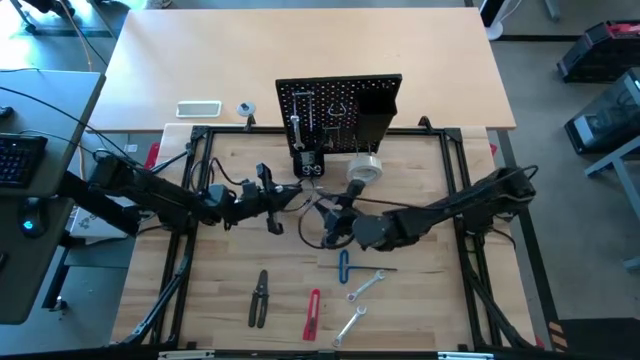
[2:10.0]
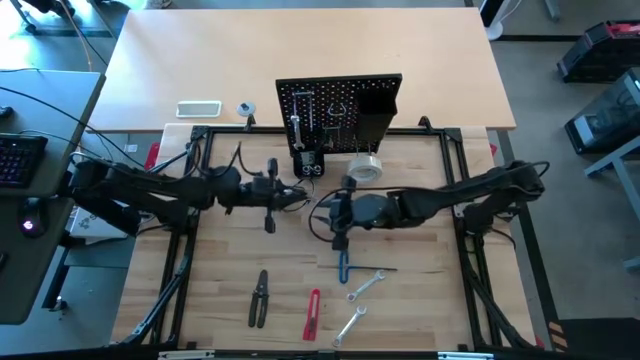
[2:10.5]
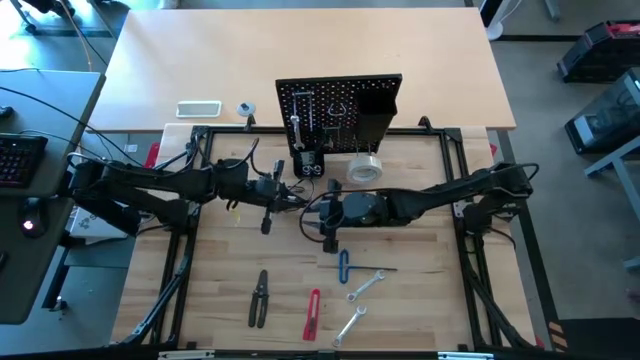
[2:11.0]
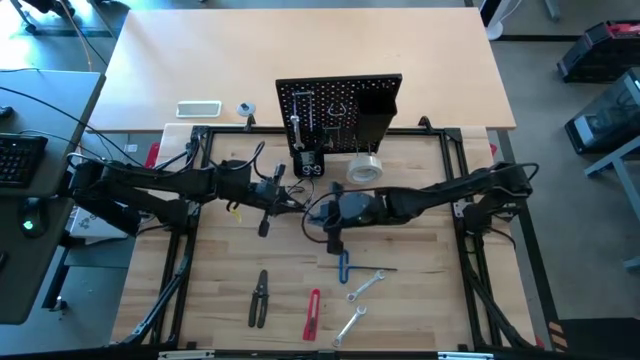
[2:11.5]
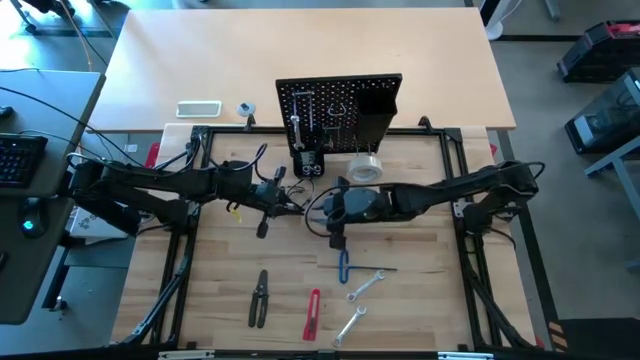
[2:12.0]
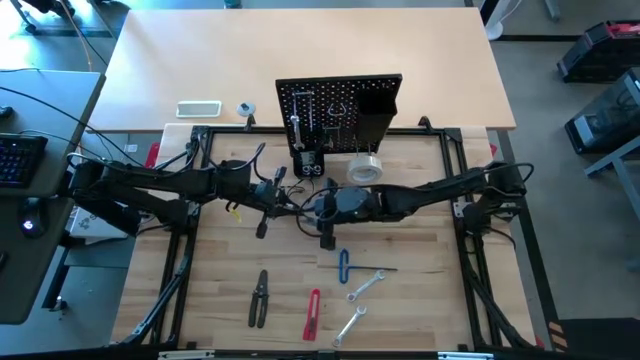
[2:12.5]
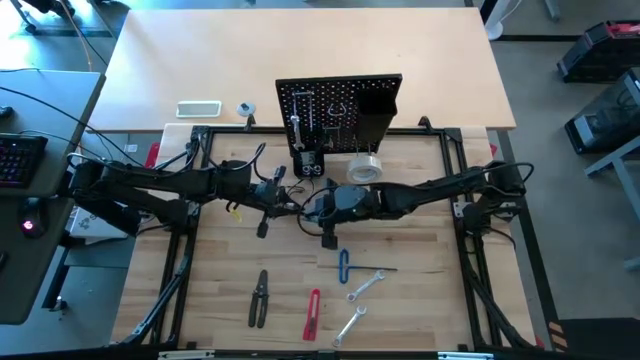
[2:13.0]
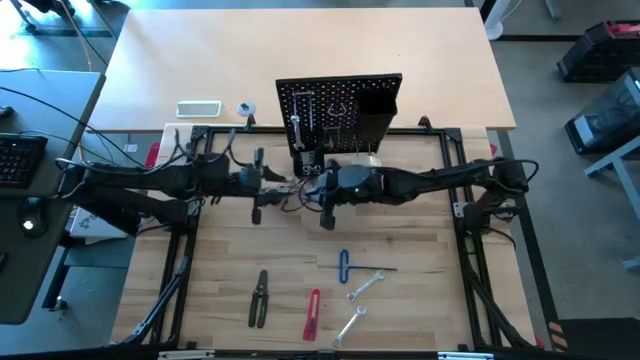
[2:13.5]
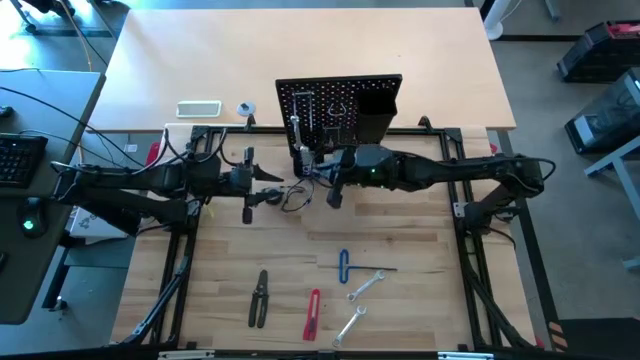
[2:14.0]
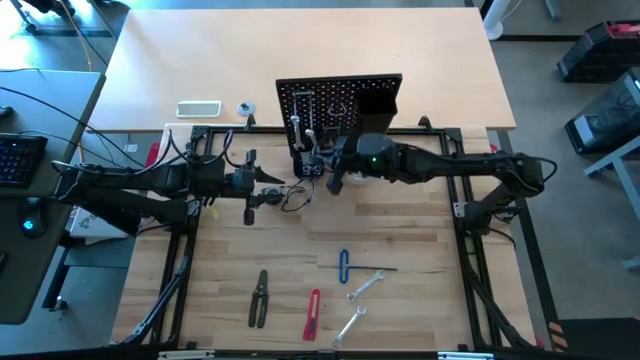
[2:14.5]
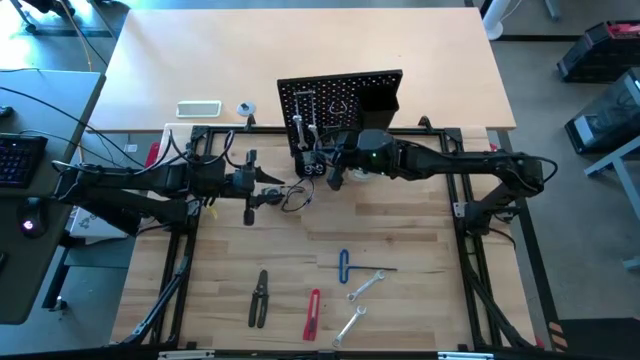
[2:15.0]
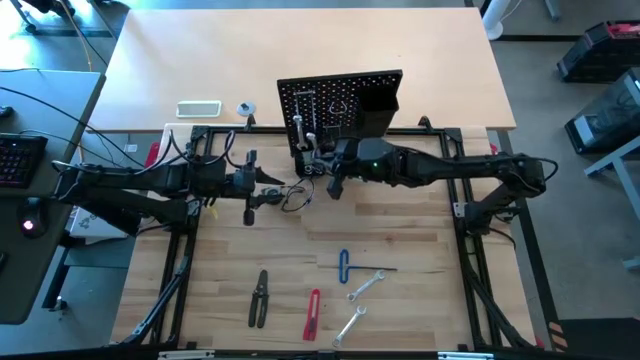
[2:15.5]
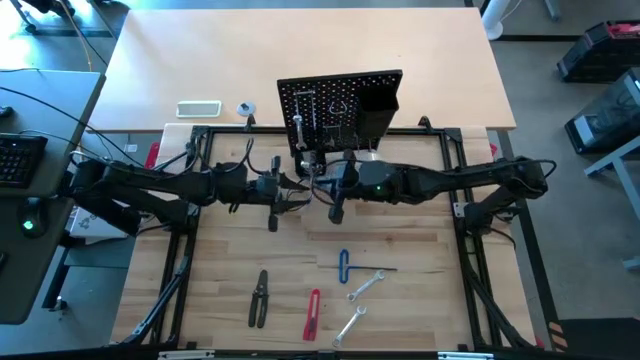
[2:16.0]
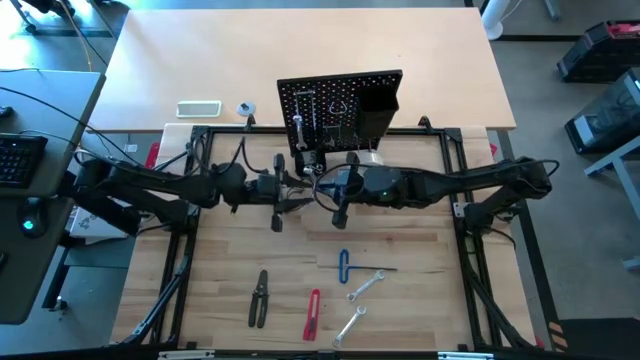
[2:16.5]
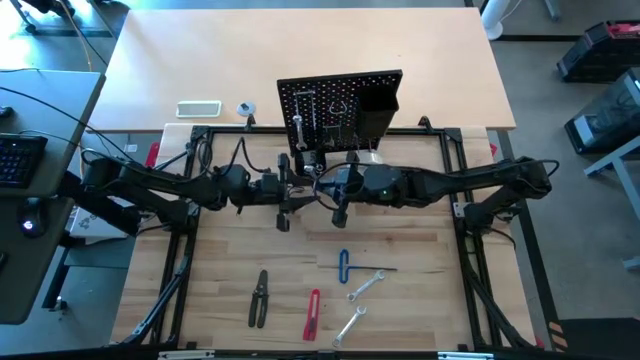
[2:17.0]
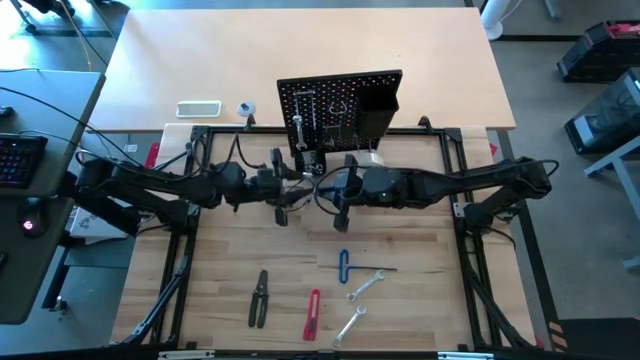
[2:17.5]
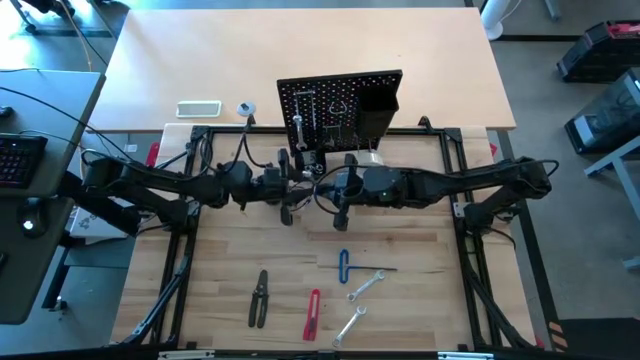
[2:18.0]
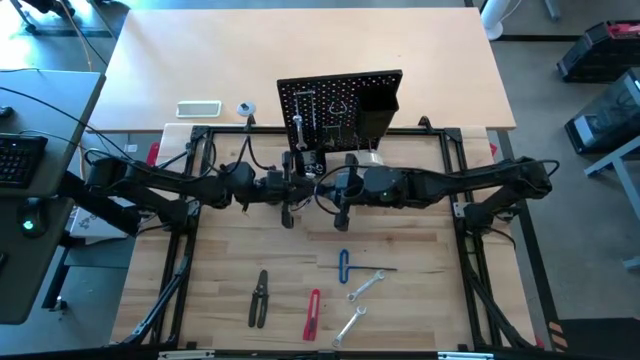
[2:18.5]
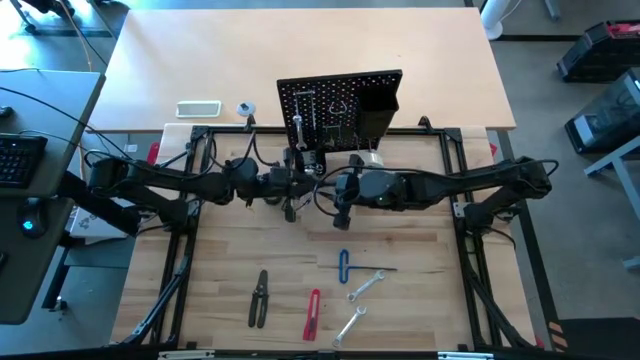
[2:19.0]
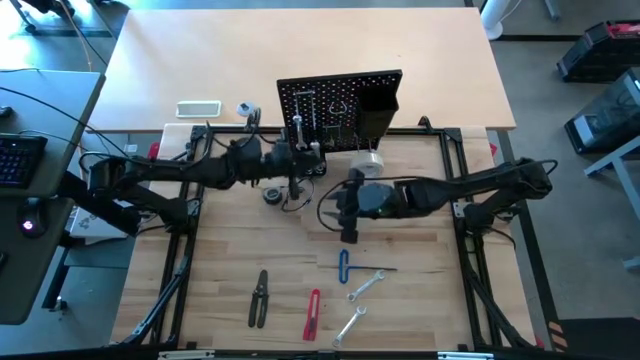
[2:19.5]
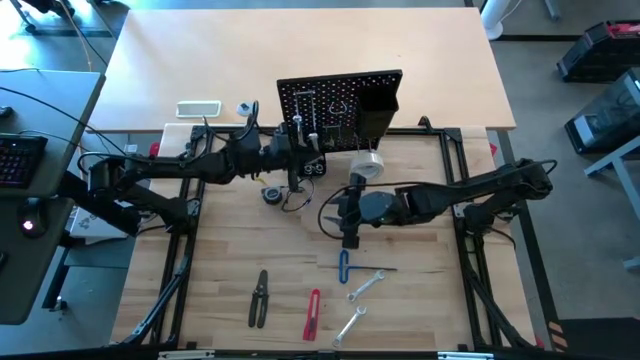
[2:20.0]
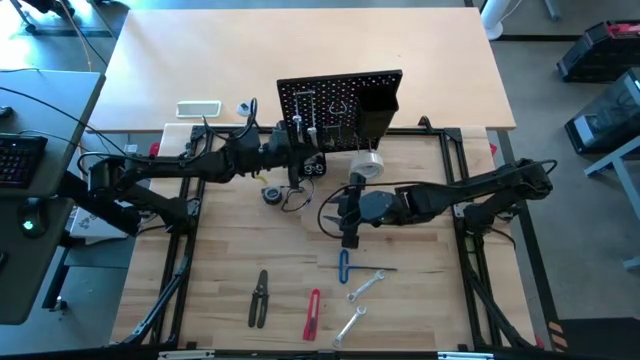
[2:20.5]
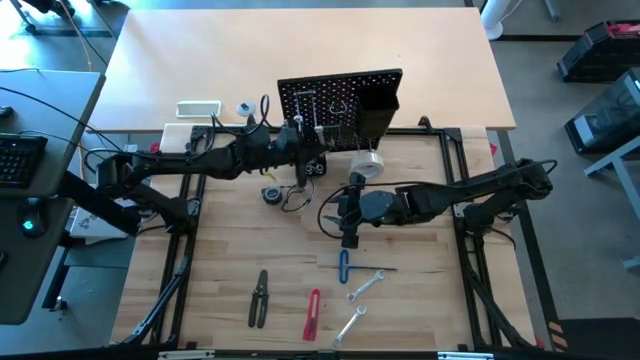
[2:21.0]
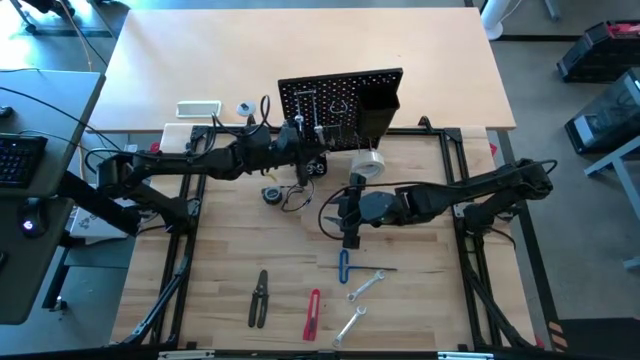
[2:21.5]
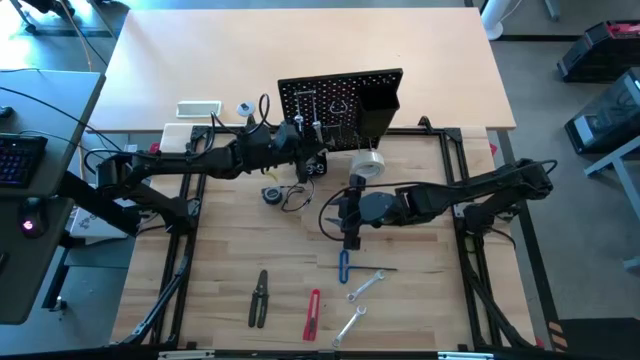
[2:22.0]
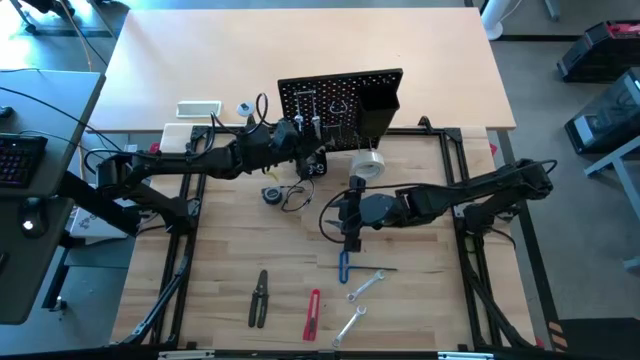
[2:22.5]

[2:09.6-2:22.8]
Task: Hang tools onto peg board
Hang the top left wrench on the pegboard

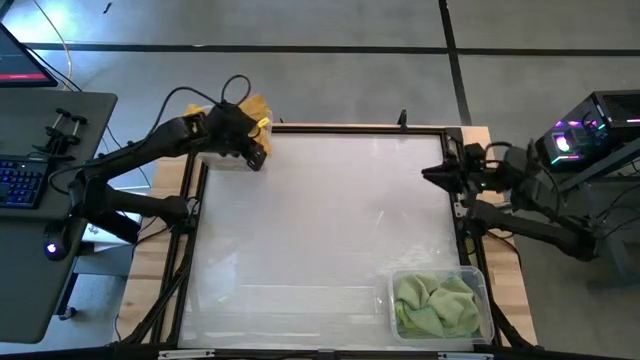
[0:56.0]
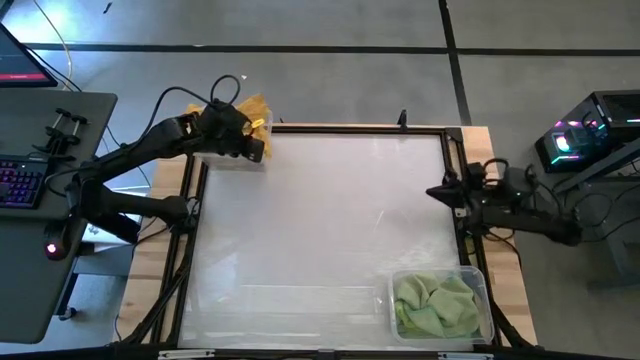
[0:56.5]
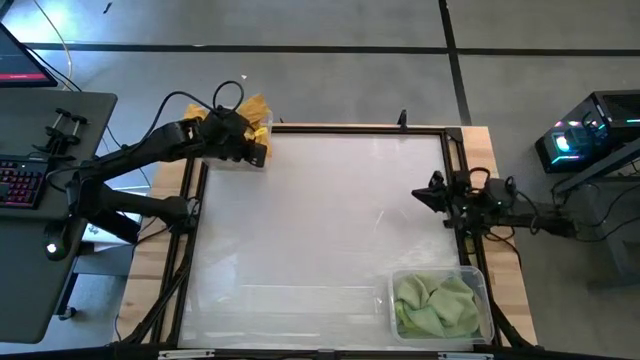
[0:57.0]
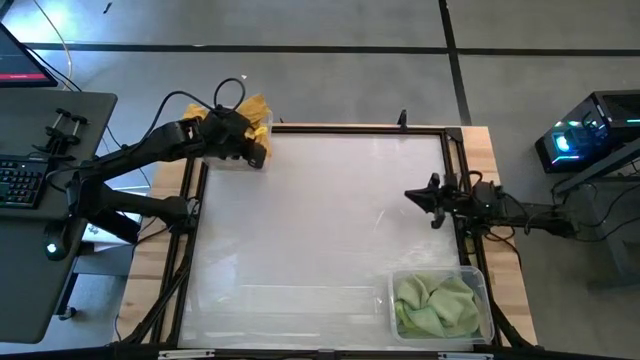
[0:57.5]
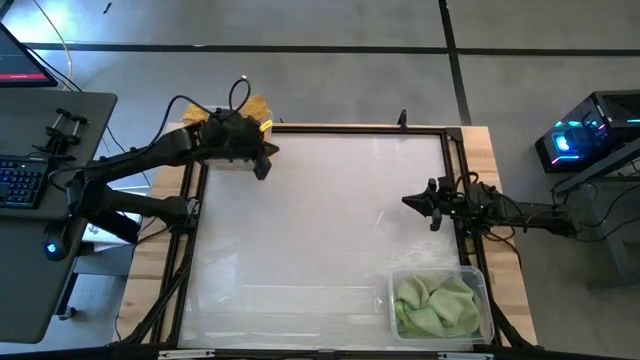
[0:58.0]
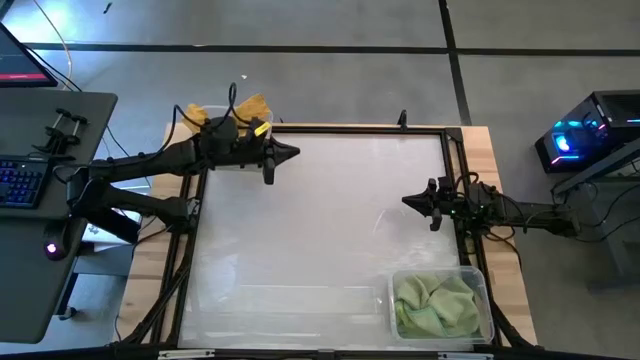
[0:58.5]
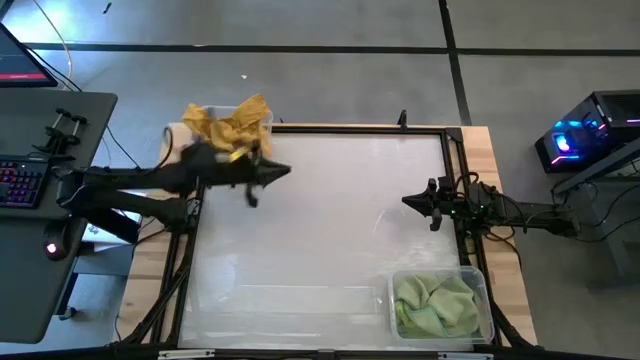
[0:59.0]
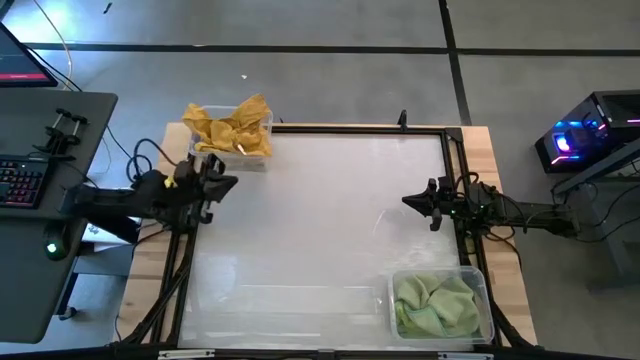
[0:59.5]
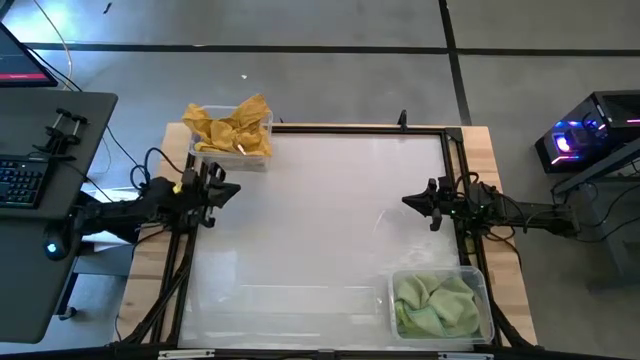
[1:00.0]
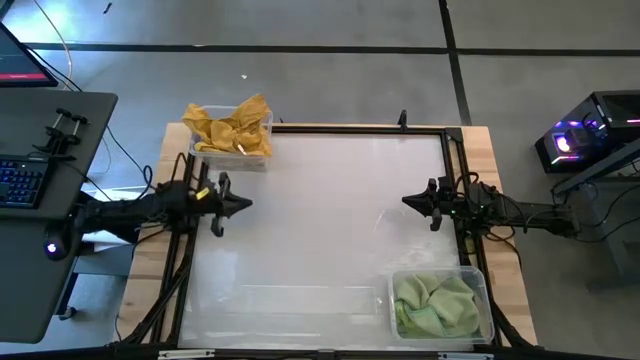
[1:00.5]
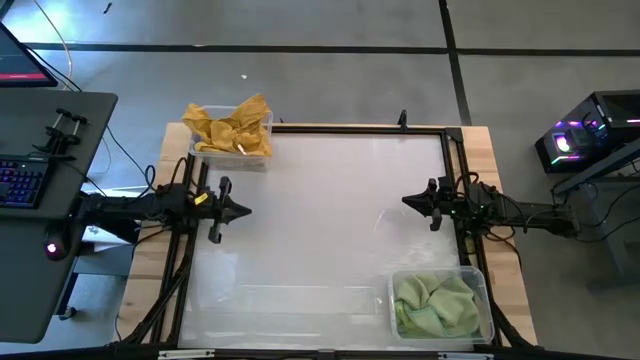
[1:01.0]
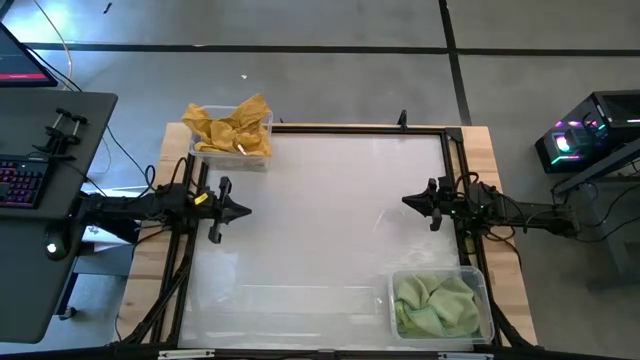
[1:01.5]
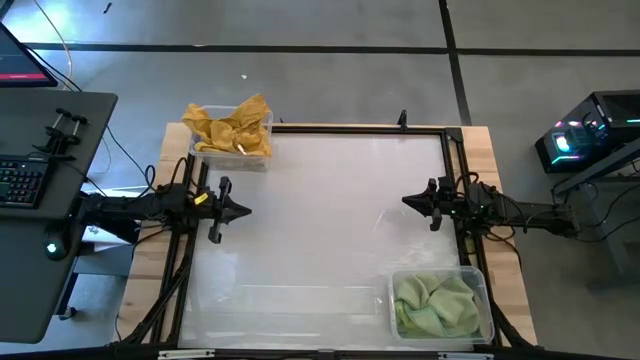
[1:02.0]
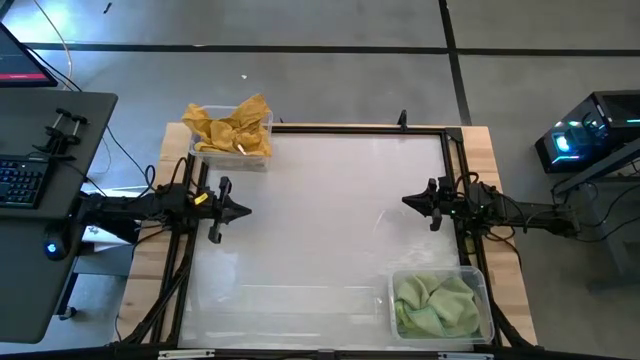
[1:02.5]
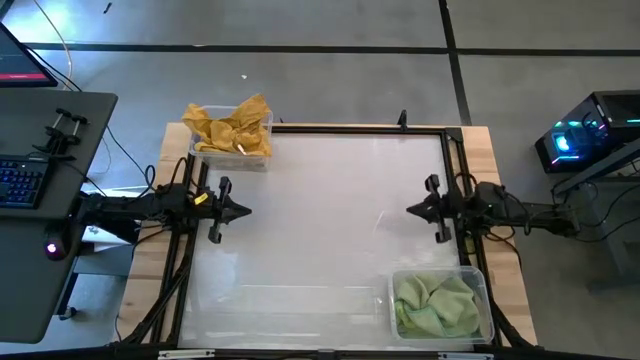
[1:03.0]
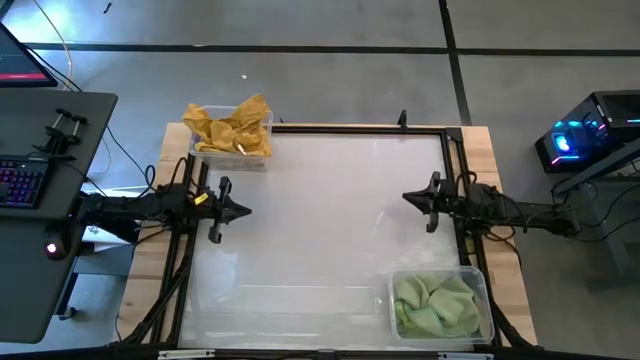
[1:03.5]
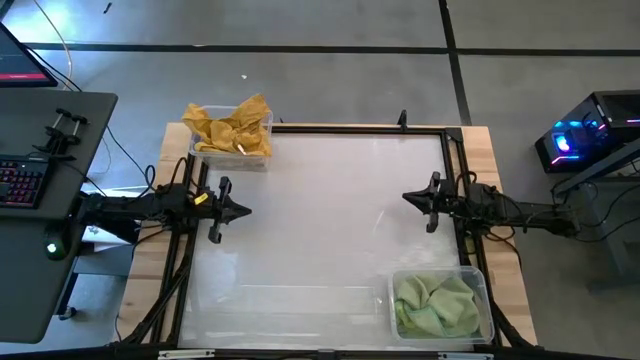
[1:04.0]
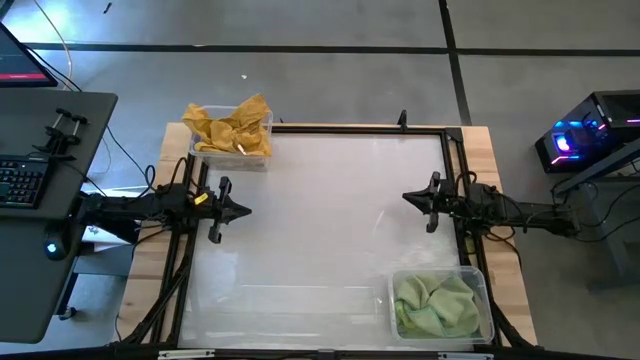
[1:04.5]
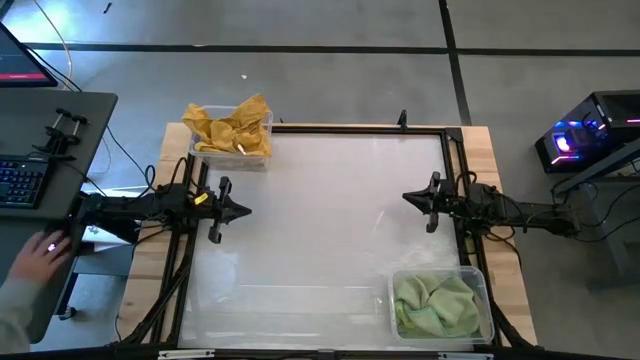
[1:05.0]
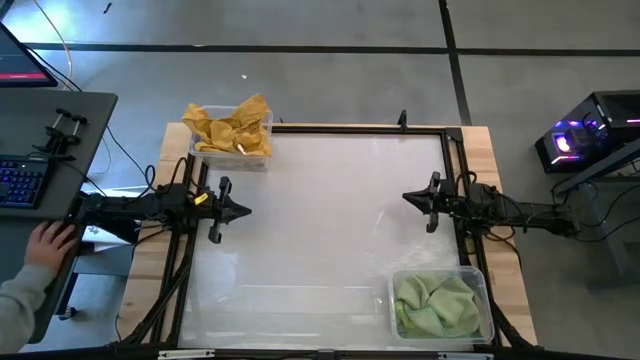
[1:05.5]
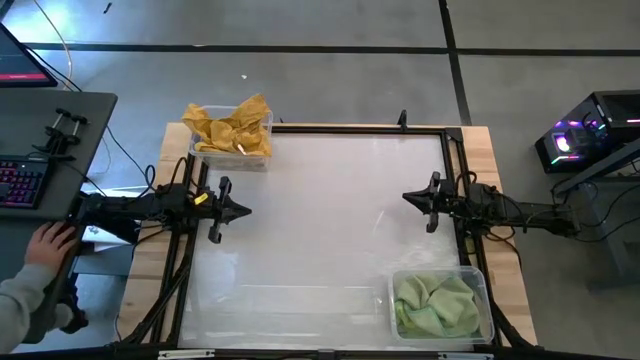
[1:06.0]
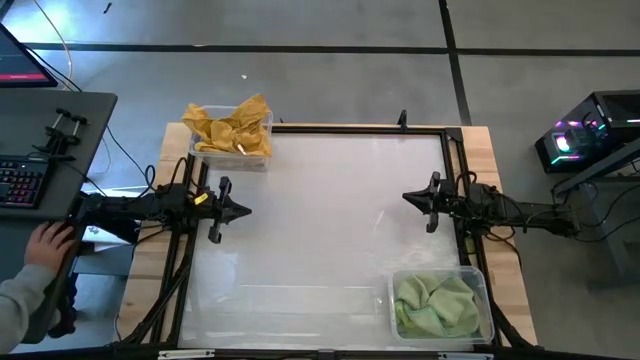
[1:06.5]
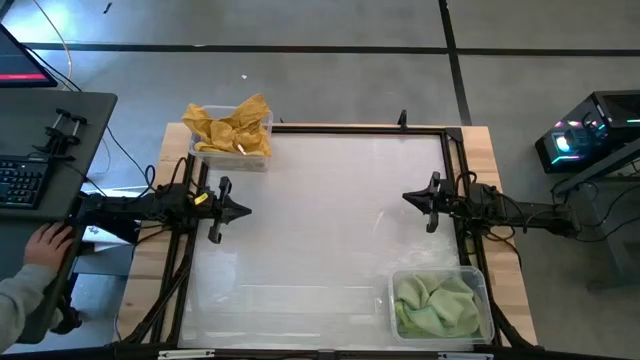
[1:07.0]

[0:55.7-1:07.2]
Task: Sort towels by color in basket
Return to Home Position
